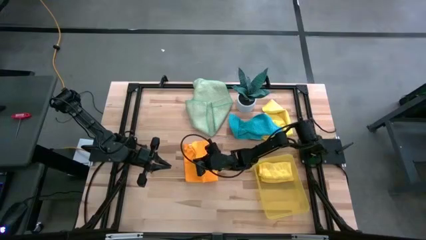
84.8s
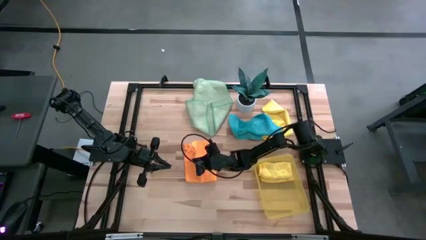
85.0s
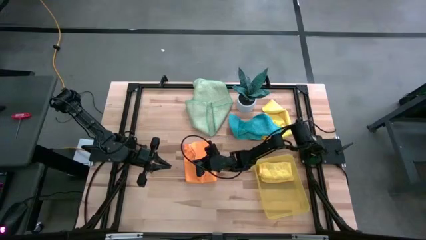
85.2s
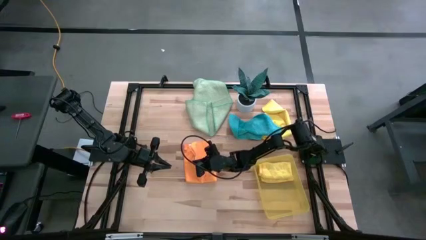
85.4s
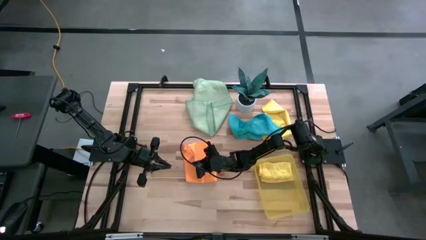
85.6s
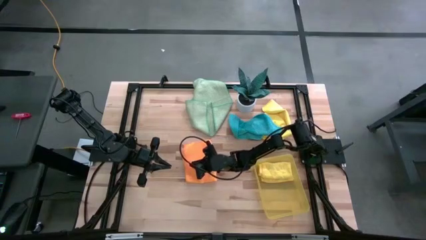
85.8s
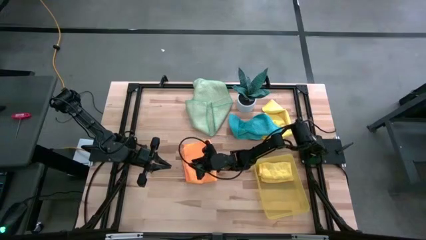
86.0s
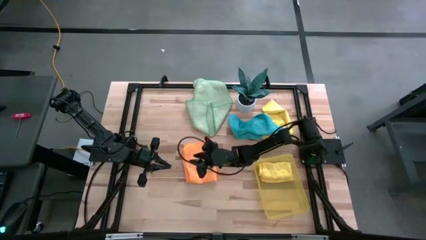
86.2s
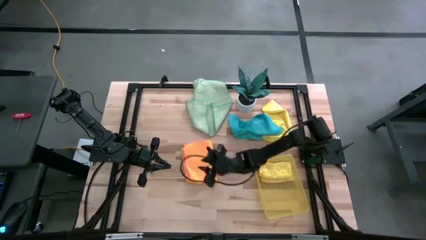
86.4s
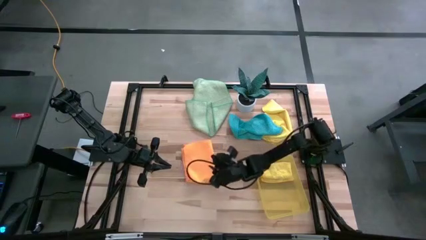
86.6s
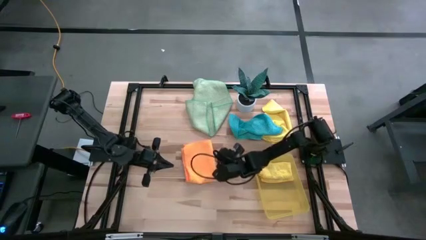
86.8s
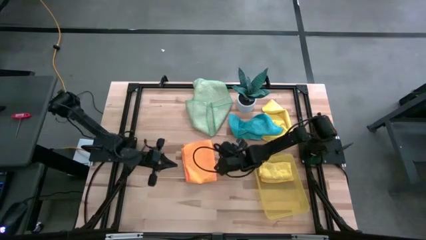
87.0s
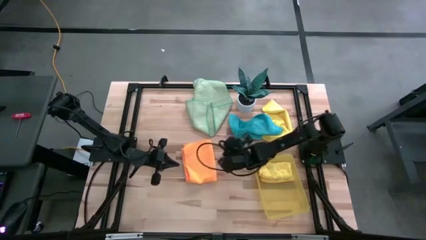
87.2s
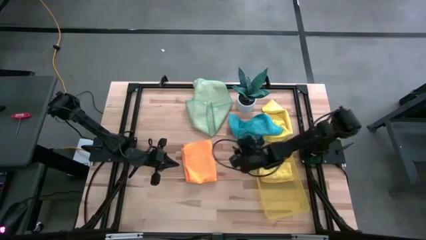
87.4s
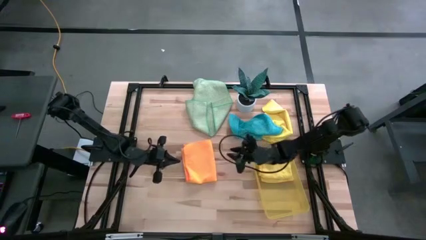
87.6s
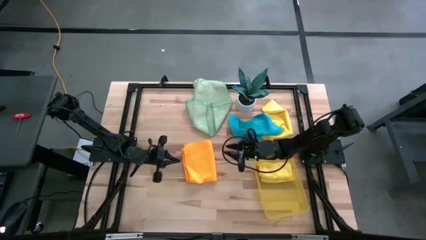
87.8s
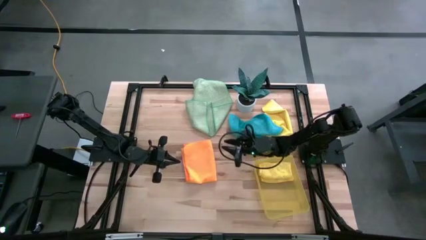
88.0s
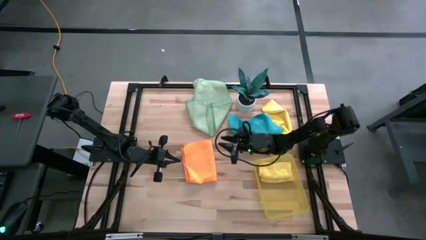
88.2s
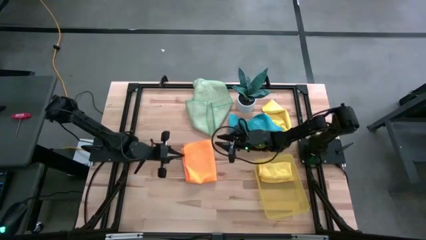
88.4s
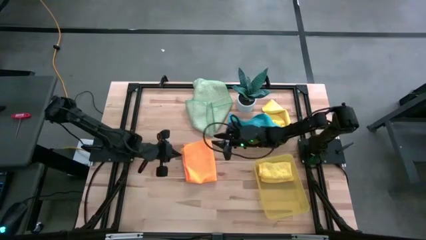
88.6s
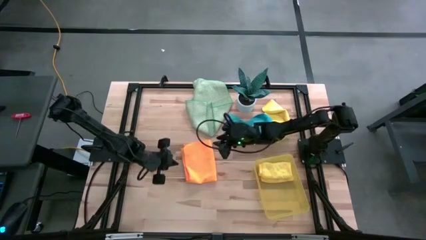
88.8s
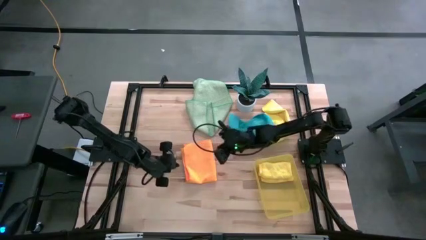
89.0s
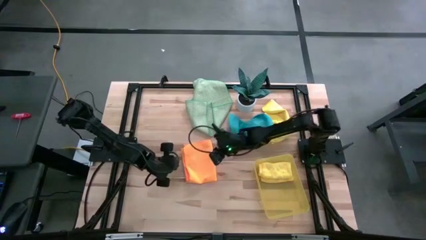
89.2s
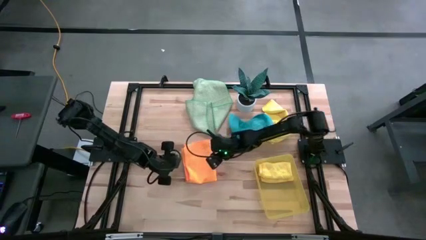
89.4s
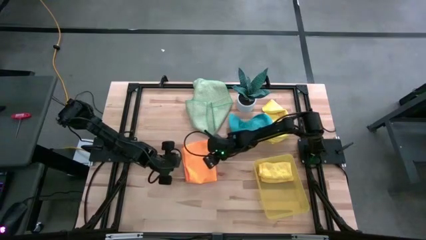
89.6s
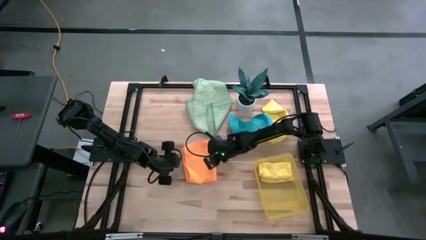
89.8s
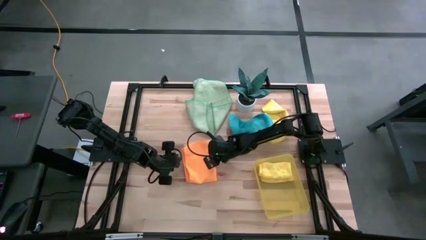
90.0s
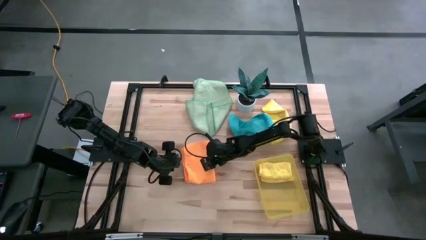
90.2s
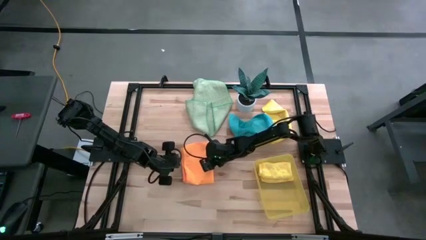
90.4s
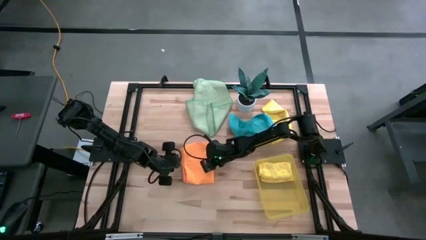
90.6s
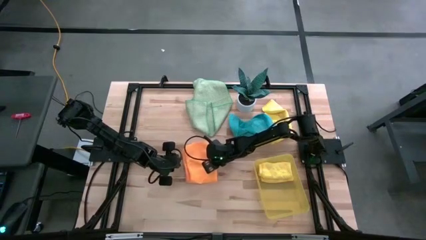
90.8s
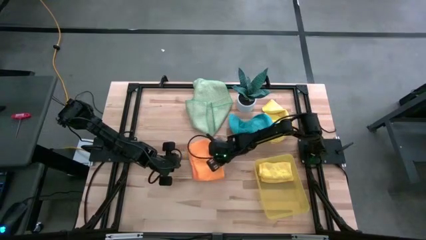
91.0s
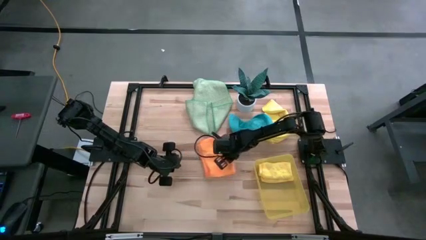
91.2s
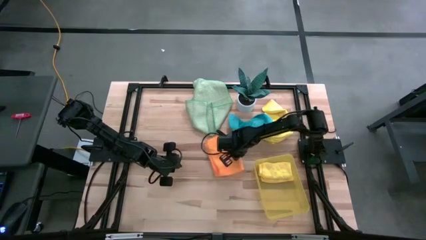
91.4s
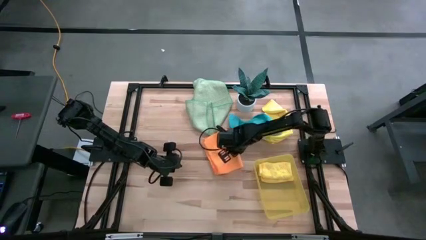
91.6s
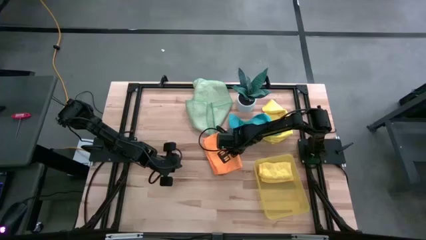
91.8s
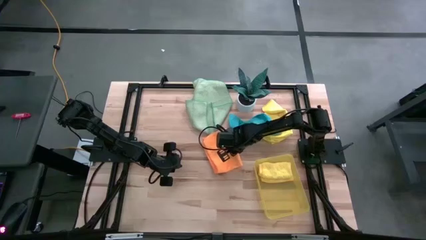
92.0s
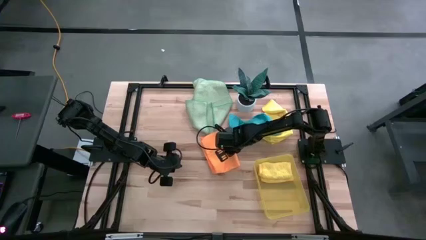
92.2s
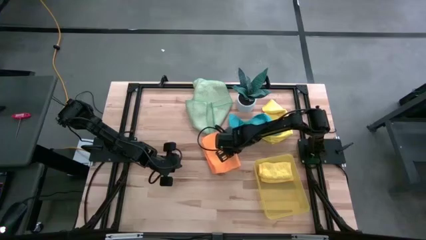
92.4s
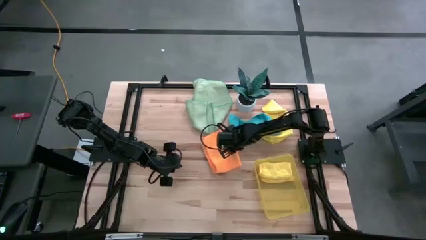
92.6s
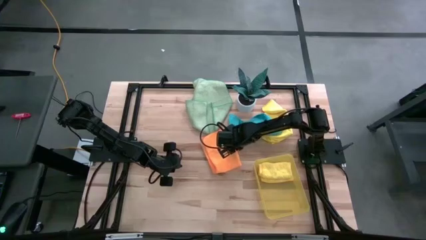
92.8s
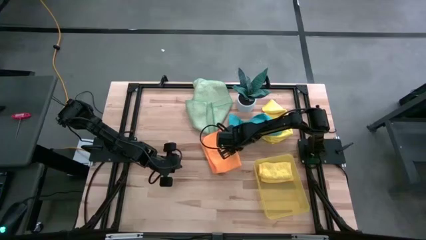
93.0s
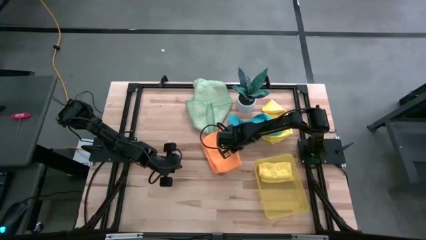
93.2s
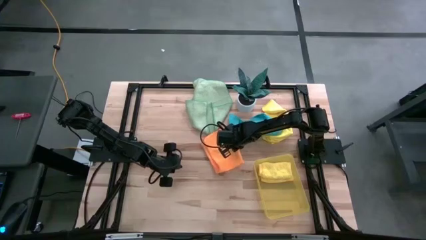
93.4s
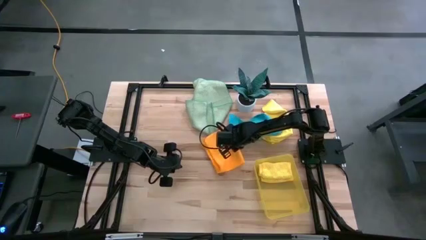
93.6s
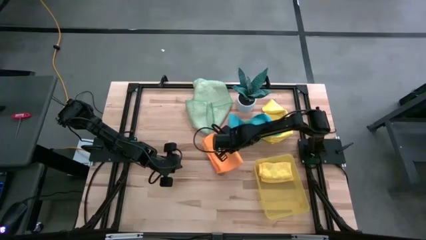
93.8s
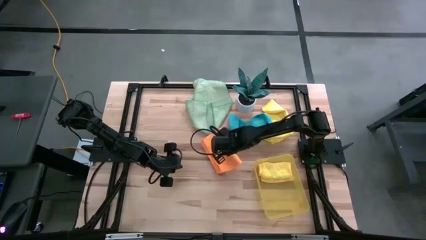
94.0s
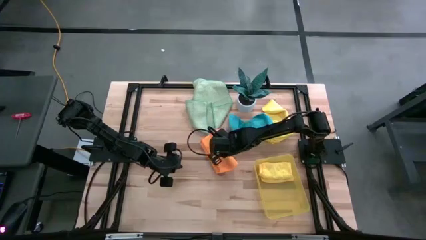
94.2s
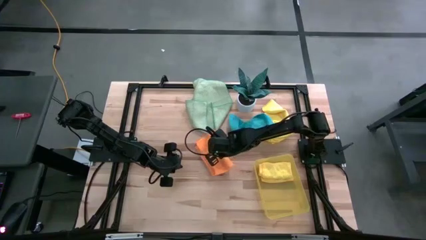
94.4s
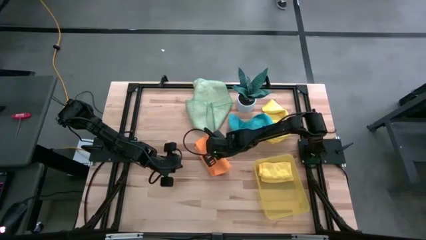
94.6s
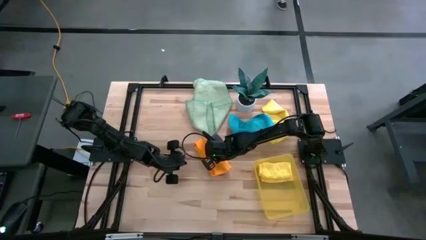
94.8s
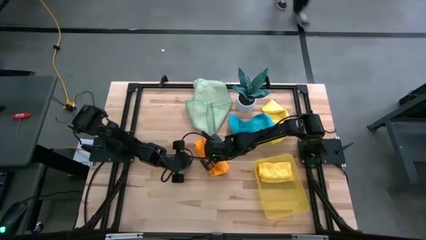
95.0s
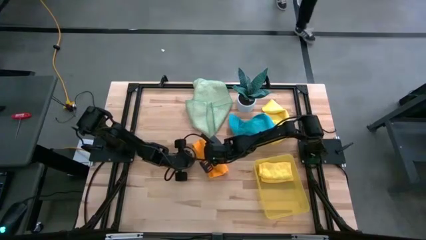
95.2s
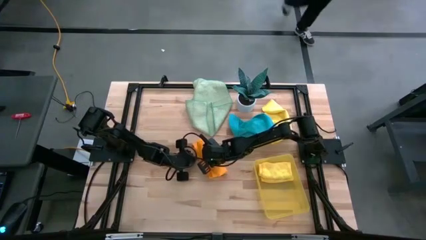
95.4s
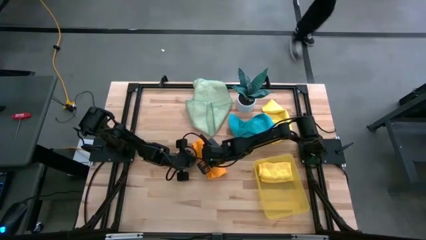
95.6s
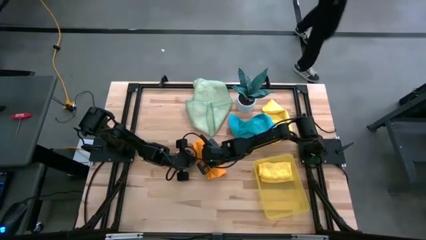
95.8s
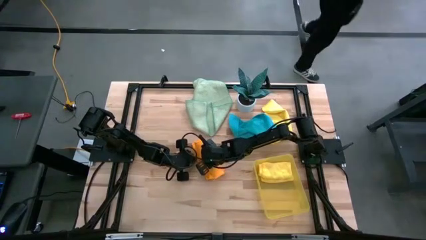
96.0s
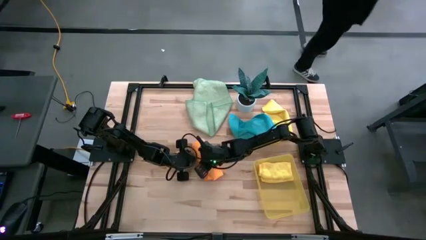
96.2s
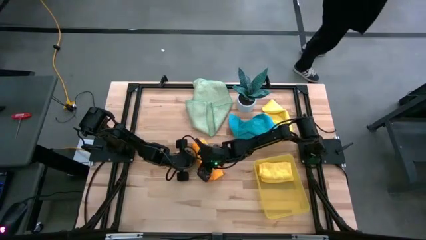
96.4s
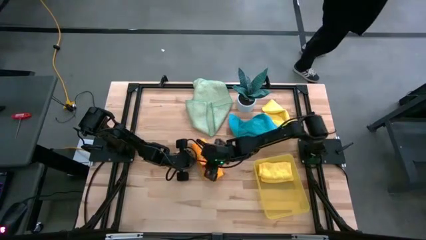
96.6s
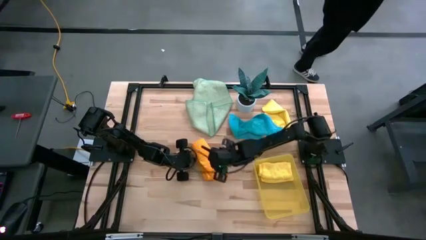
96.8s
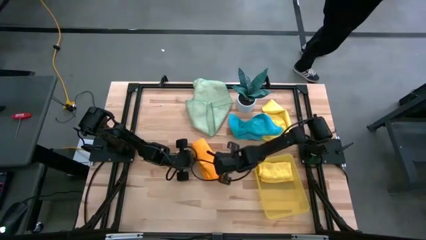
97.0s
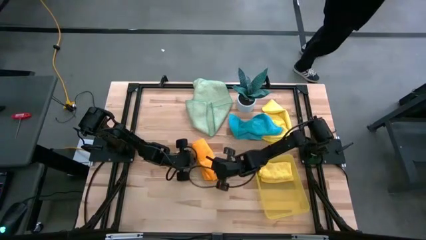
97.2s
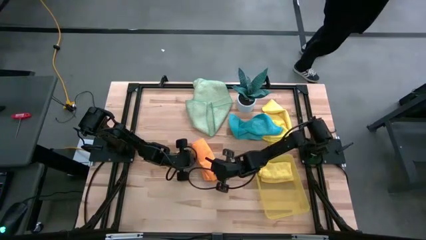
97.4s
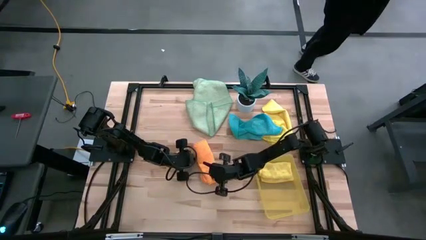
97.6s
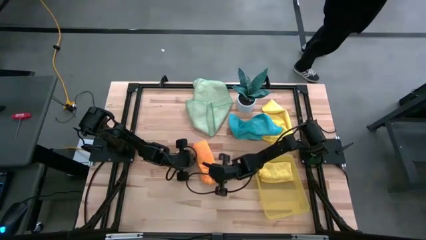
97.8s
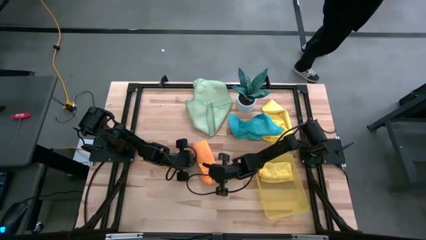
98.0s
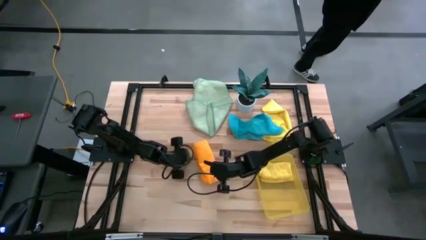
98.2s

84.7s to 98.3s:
Task: Fold microfiber towels
Fold the orange microfiber cloth
